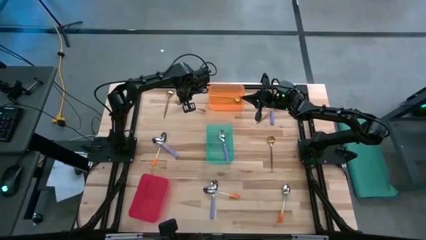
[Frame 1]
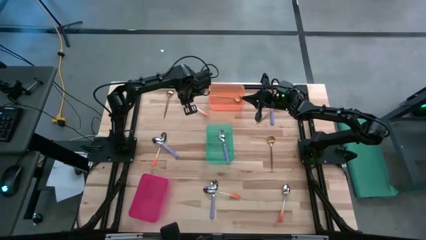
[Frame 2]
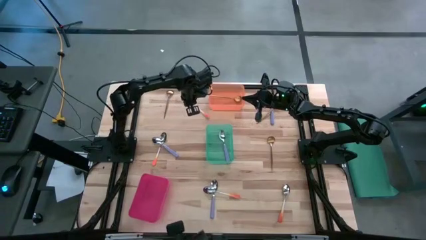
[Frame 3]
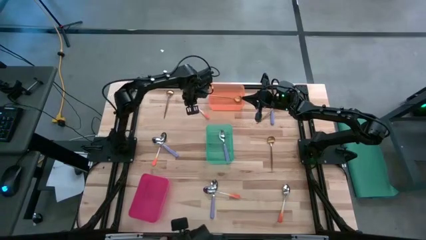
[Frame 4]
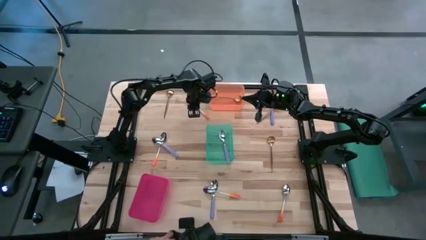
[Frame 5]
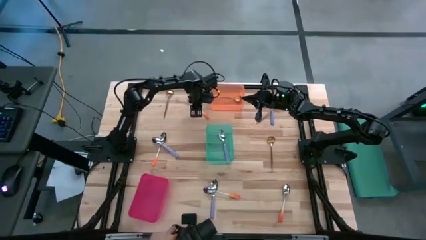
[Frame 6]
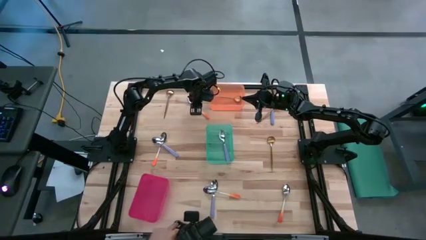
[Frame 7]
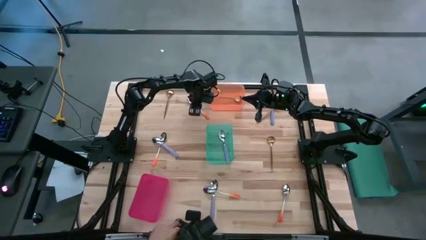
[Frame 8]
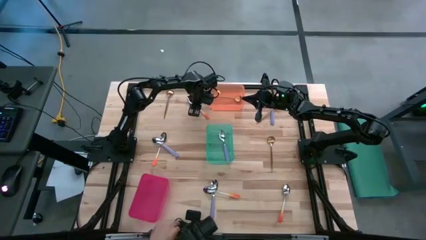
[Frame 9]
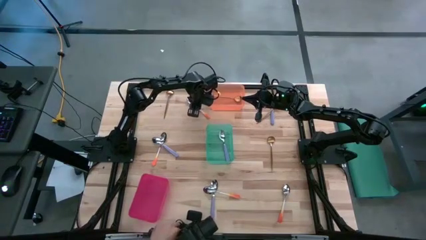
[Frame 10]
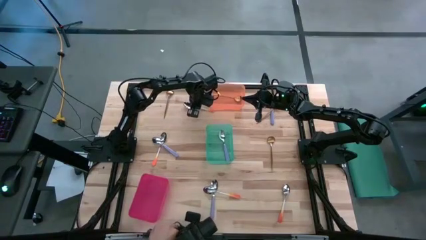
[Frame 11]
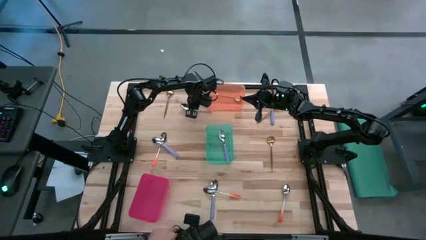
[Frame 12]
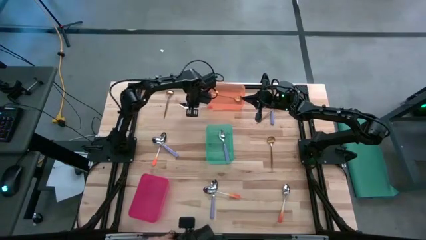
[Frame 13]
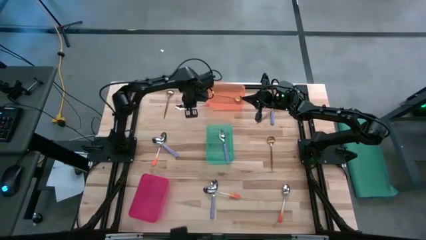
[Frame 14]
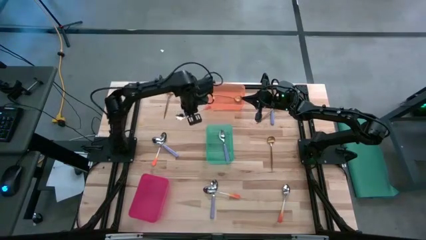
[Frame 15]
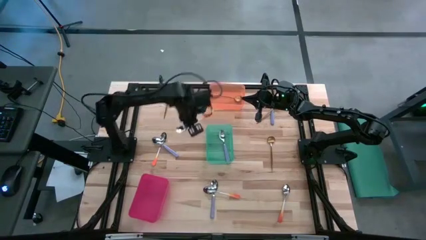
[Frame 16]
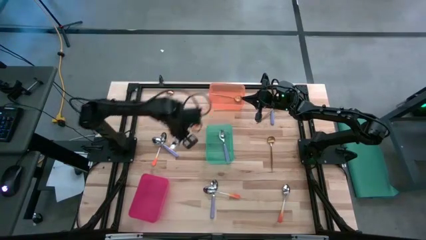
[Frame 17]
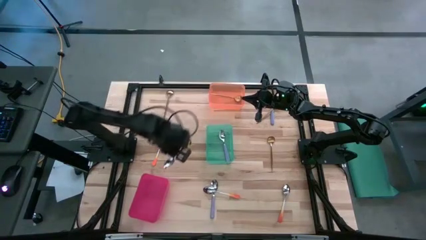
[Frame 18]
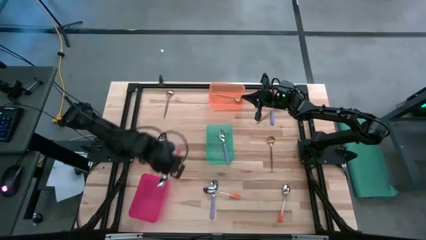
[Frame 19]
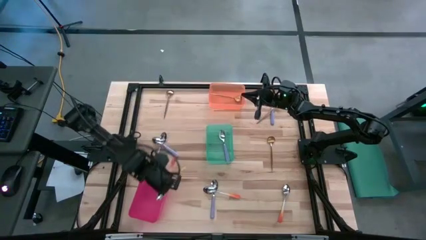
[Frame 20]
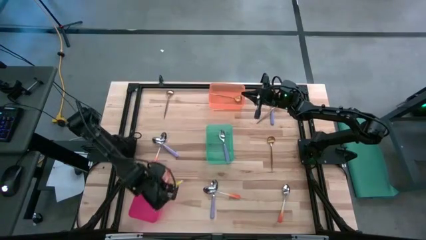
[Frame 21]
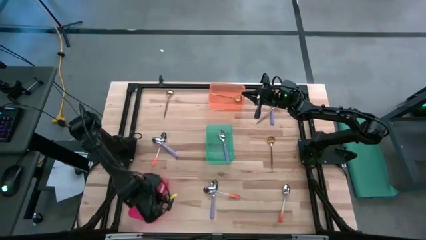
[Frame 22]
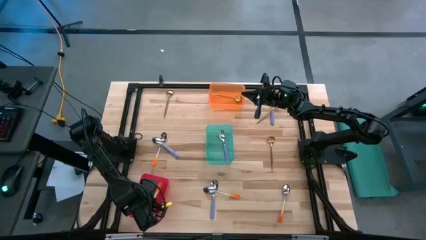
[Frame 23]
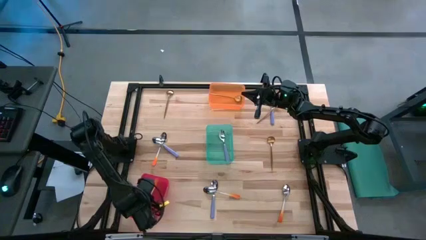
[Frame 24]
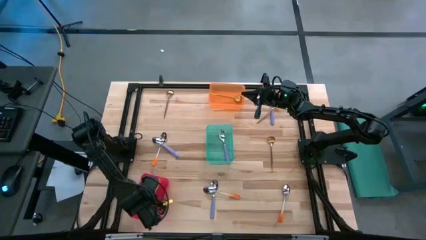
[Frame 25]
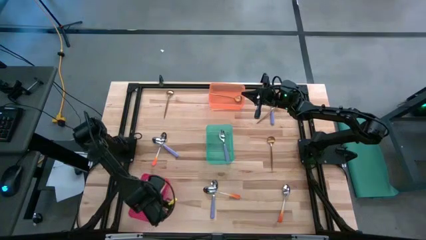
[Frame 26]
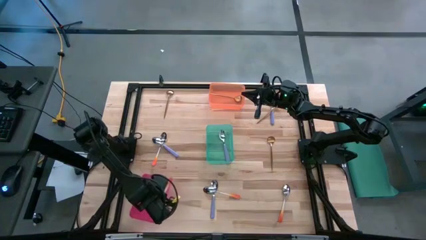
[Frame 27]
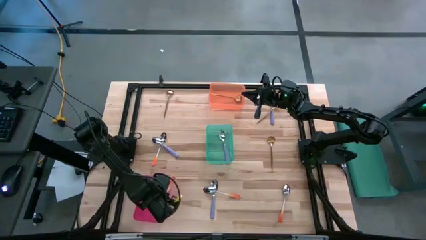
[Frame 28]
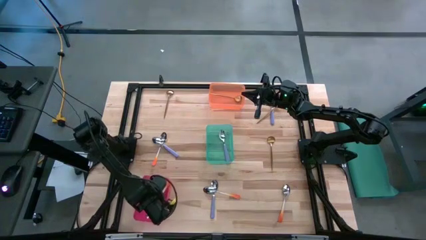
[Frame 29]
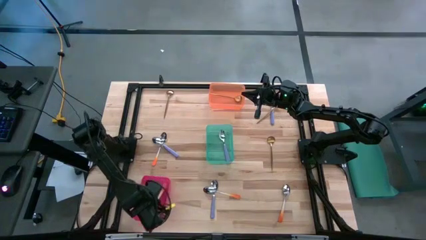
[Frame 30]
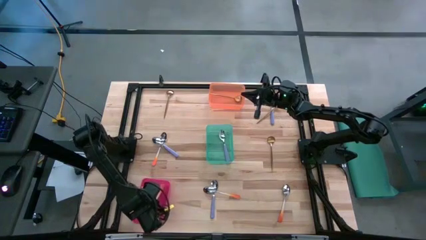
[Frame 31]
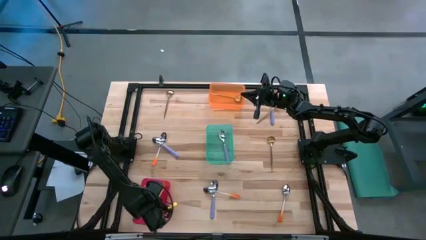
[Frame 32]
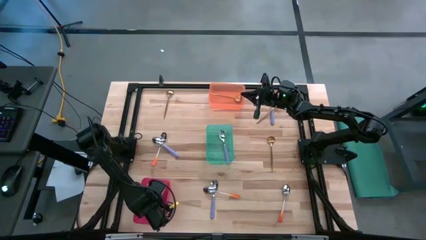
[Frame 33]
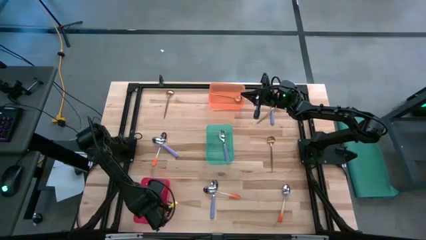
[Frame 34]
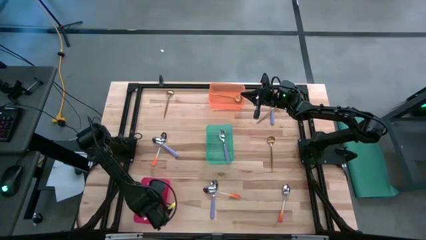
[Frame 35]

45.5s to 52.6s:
Task: Sort silverware by color (type)
Put the orange spoon into the red bin

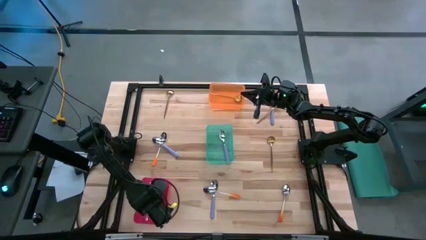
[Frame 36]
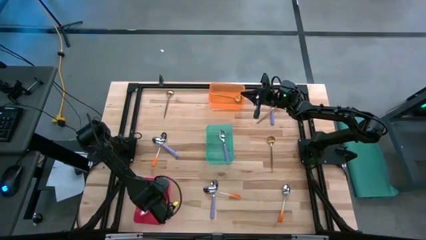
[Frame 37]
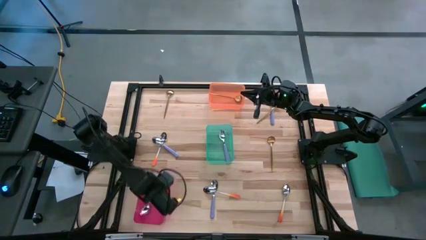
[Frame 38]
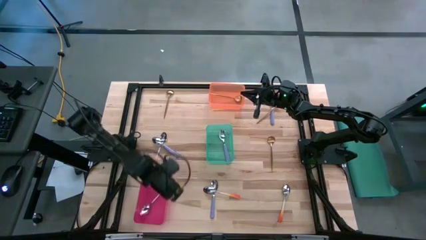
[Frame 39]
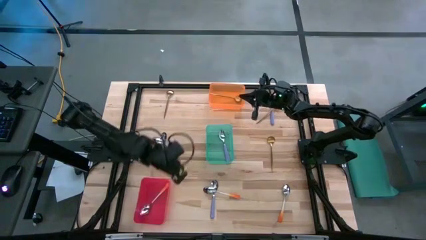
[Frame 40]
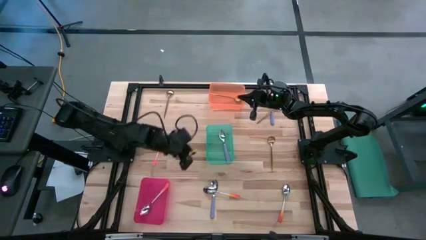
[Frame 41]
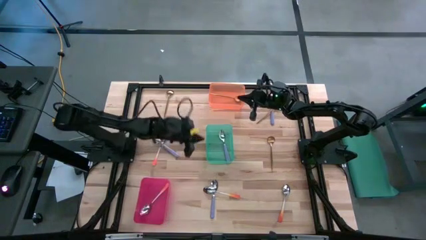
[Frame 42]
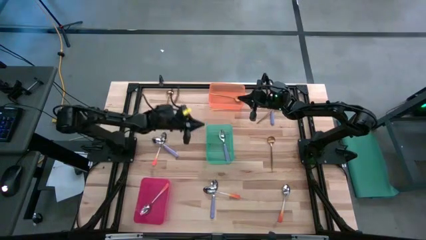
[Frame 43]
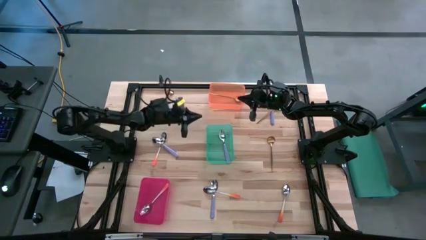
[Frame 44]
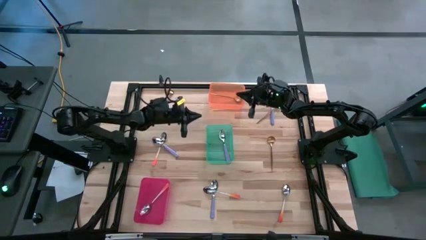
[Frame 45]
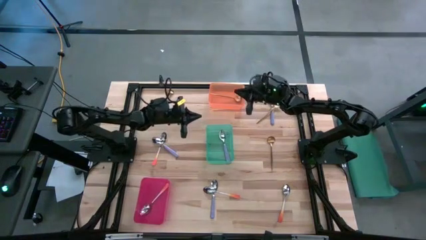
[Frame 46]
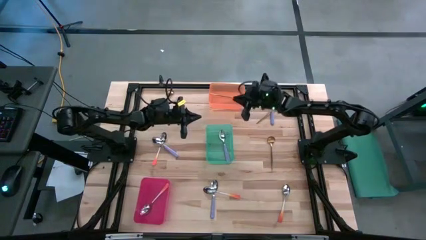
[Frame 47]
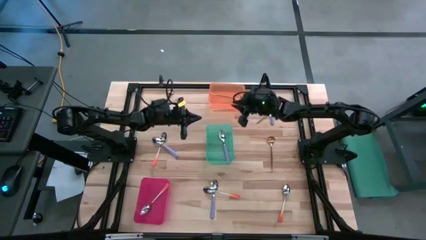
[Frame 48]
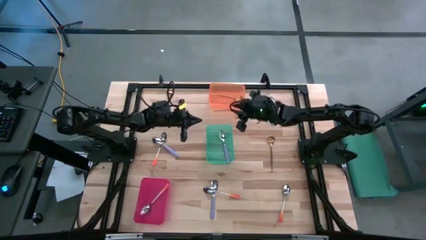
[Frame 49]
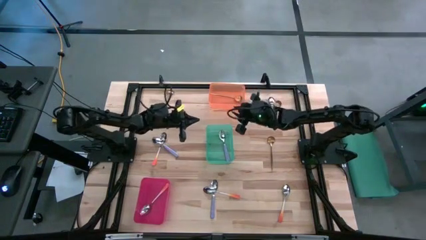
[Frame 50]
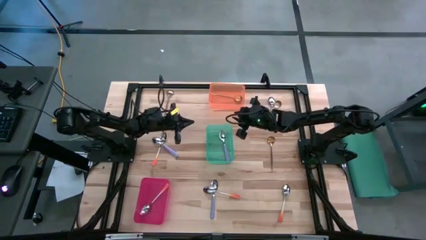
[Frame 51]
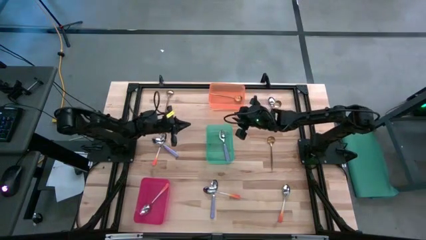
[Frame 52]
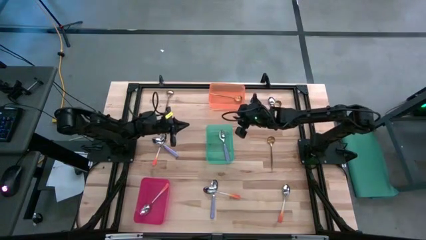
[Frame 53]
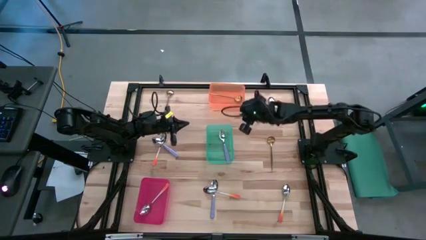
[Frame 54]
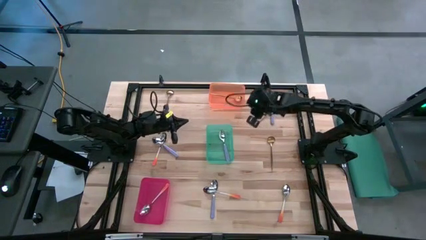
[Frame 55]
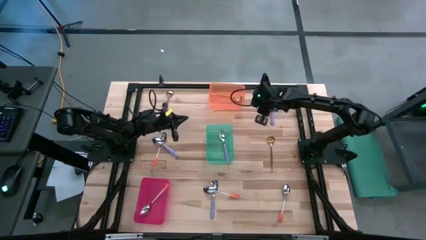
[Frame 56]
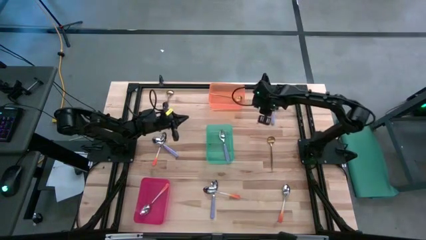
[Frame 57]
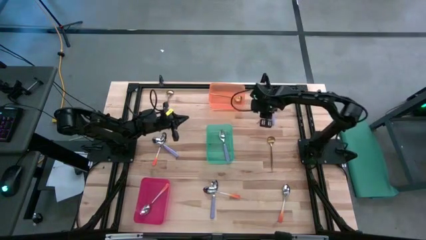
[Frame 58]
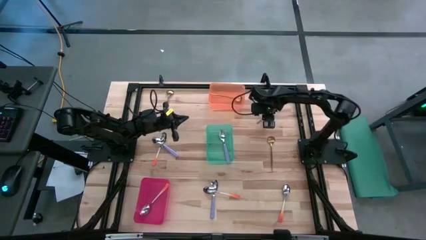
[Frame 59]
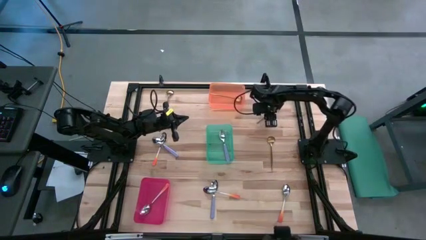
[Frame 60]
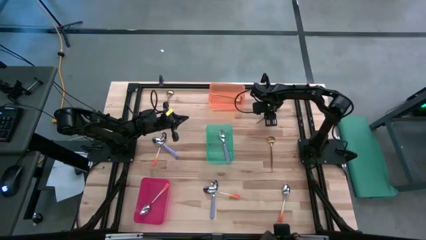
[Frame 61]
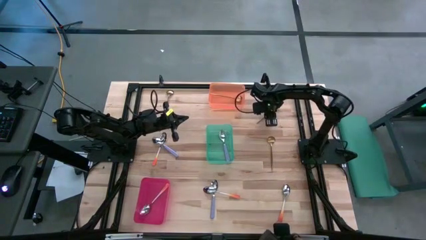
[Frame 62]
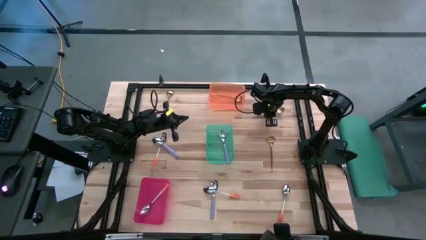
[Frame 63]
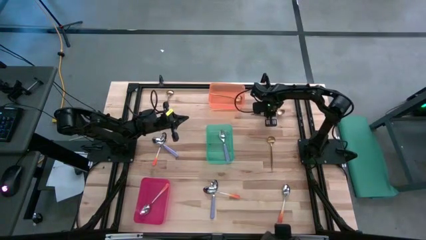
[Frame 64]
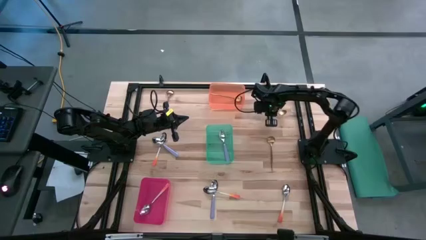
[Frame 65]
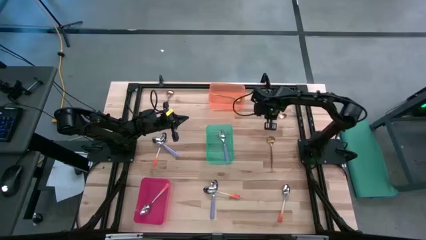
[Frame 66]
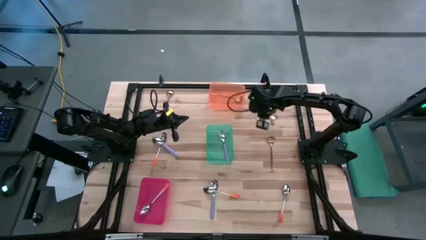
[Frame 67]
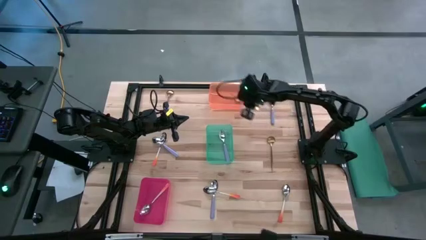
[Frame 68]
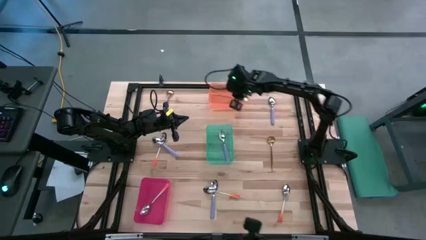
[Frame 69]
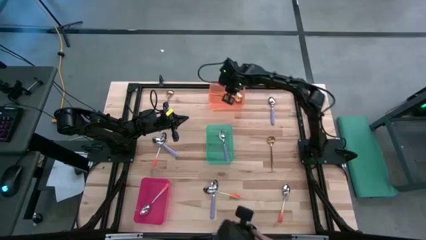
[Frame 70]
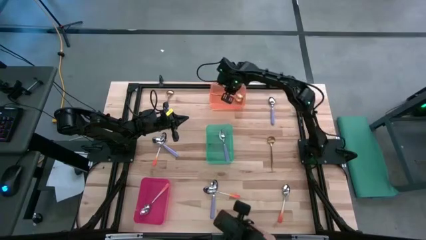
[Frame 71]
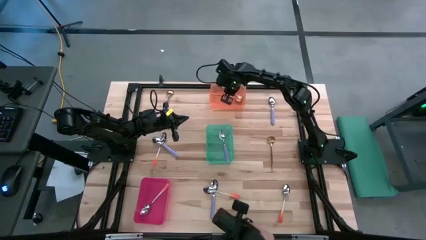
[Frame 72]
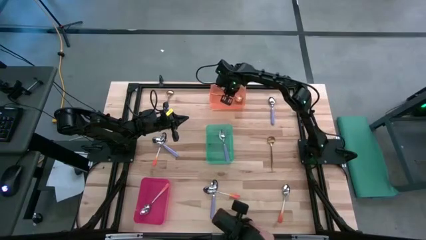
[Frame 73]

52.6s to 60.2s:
Put the gold spoon into the orange bin

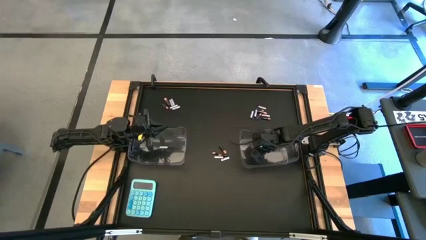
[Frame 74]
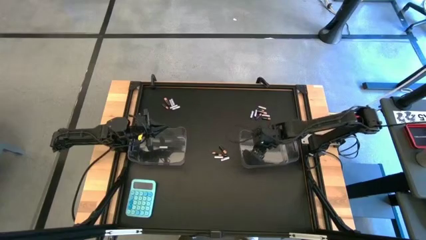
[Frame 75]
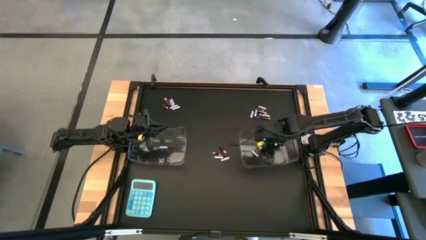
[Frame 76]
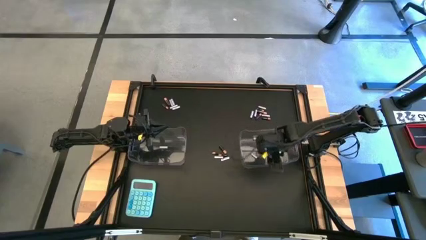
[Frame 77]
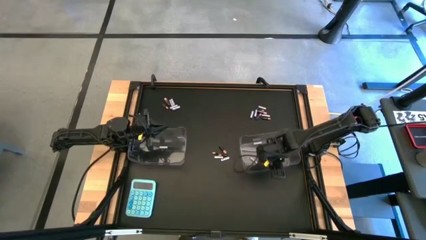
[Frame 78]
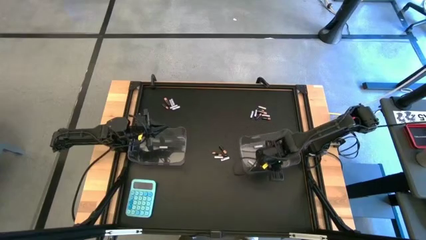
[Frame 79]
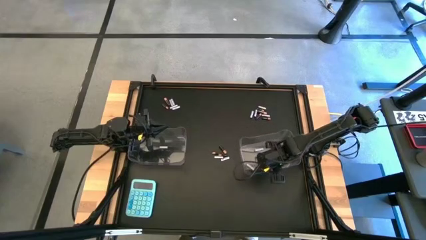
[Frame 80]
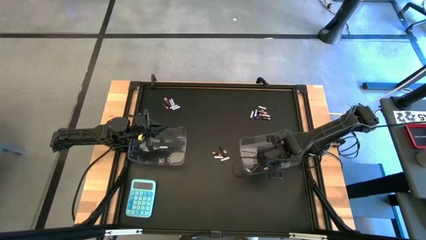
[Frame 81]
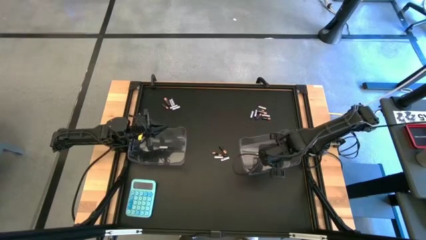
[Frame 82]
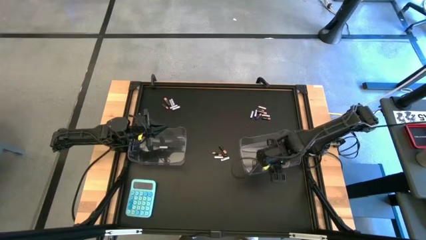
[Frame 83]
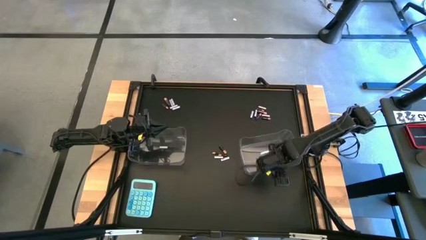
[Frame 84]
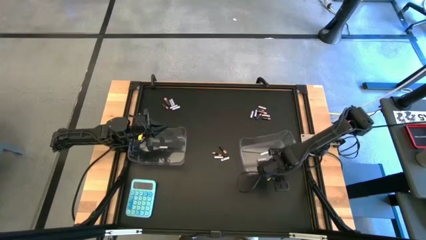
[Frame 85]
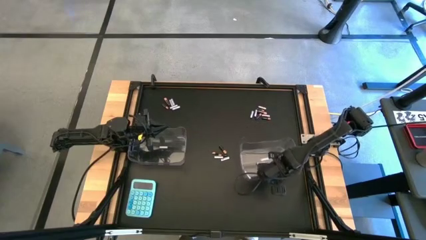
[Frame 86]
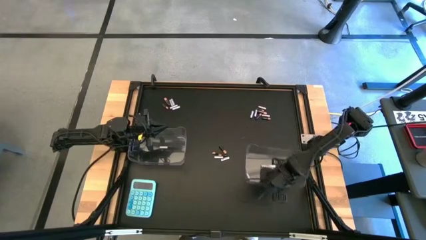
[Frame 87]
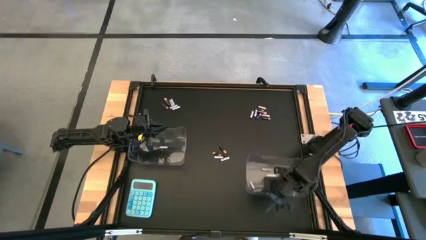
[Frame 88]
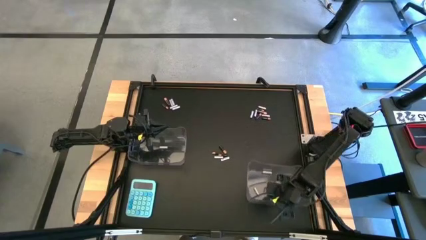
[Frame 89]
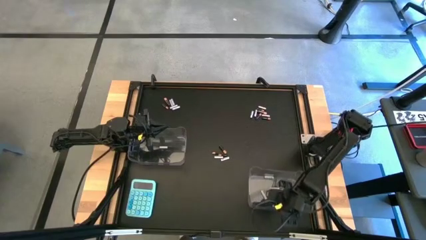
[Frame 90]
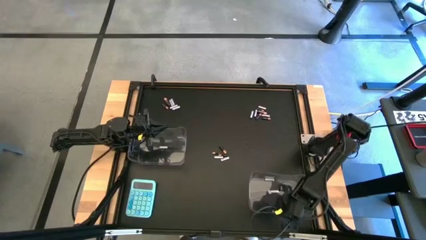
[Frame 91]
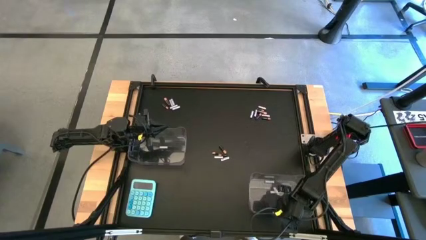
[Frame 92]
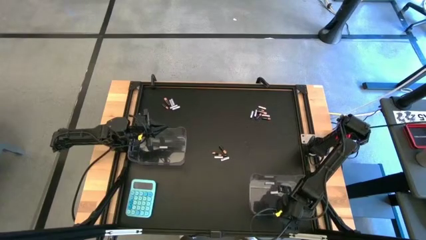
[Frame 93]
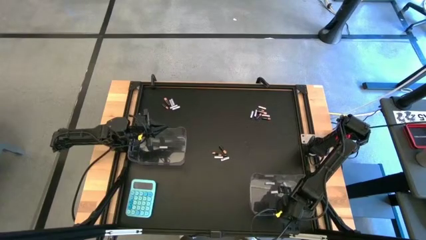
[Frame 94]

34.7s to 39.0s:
Task: Sort batteries
Move the right transparent bin to the bottom right of the table
